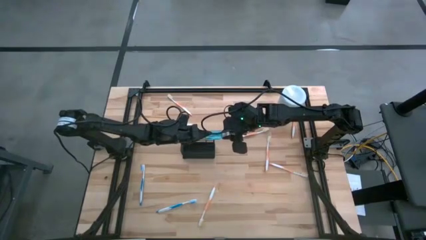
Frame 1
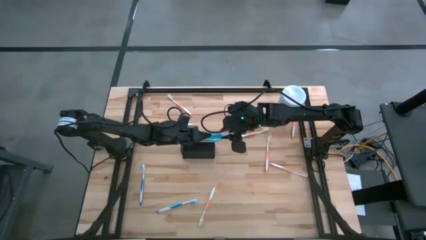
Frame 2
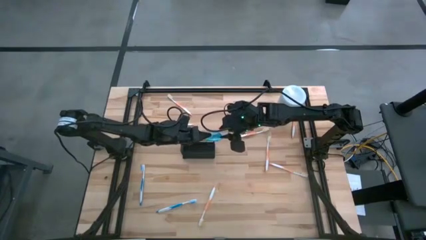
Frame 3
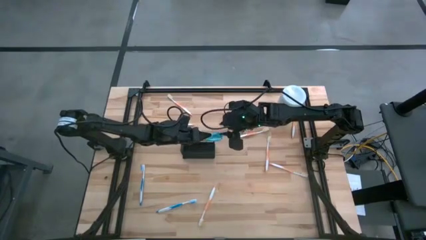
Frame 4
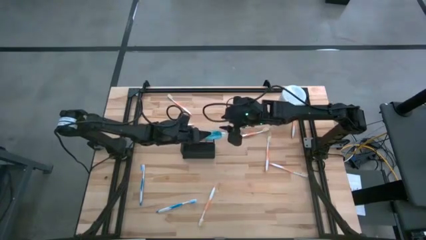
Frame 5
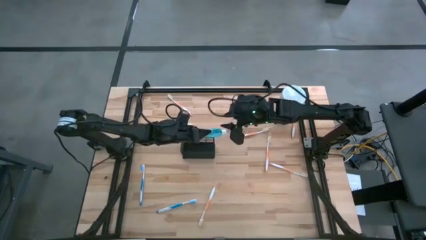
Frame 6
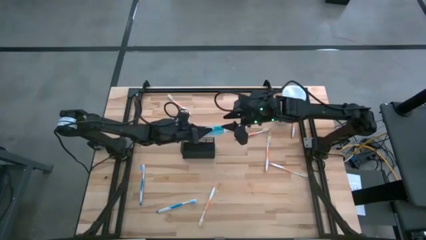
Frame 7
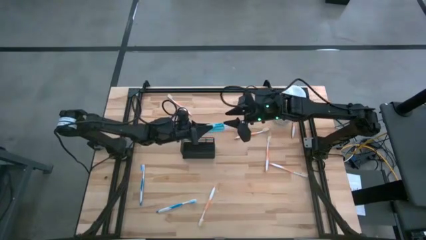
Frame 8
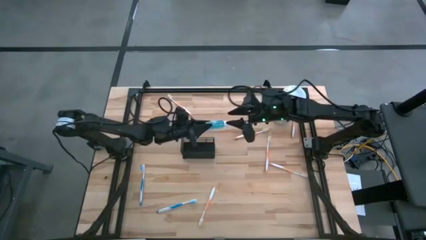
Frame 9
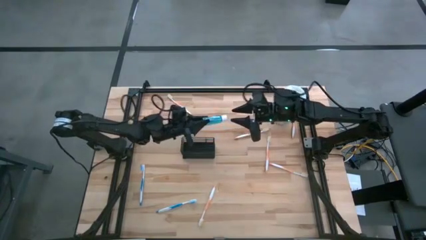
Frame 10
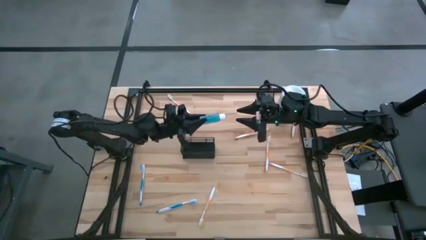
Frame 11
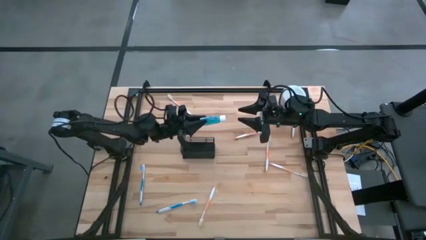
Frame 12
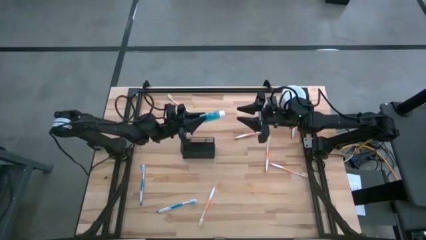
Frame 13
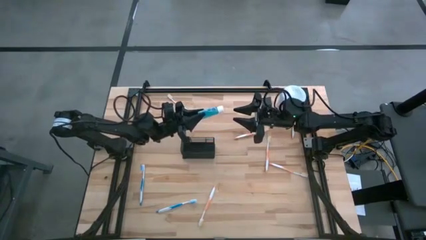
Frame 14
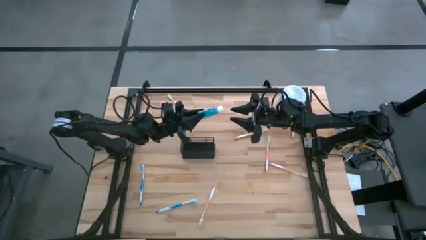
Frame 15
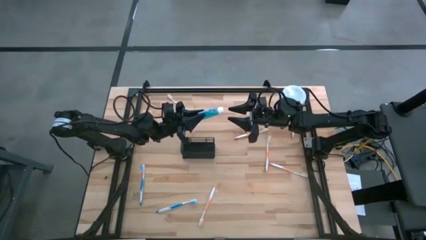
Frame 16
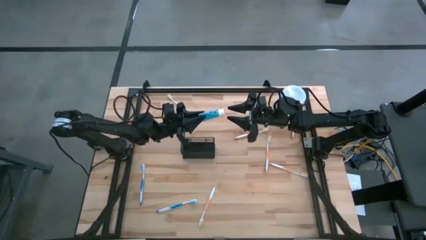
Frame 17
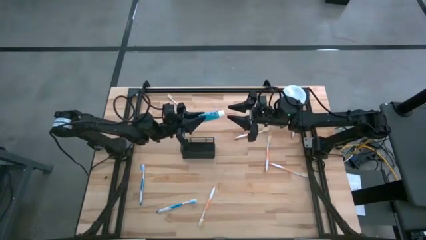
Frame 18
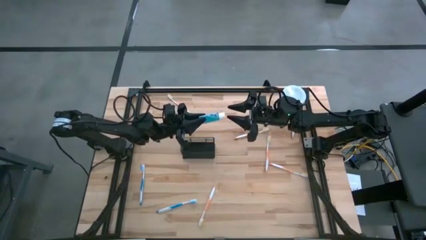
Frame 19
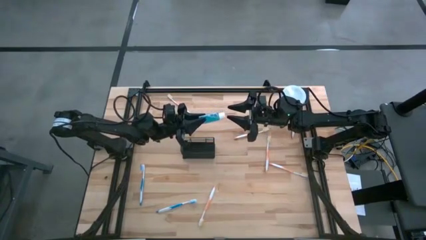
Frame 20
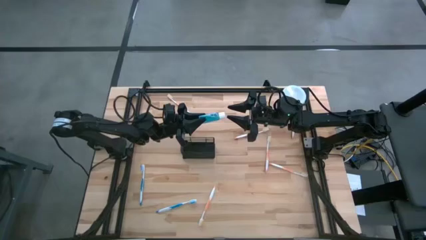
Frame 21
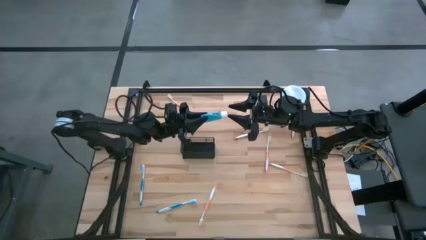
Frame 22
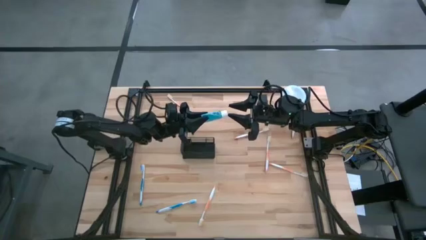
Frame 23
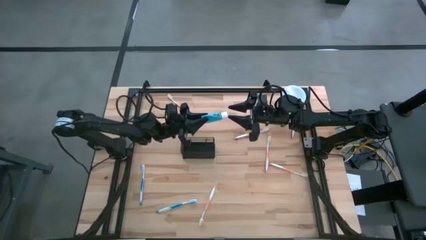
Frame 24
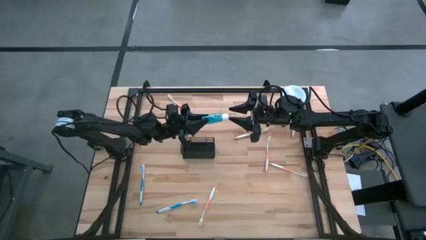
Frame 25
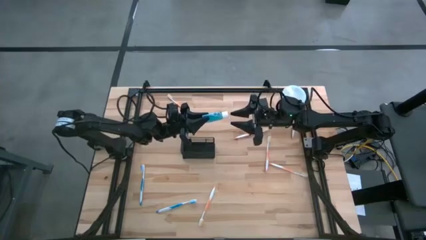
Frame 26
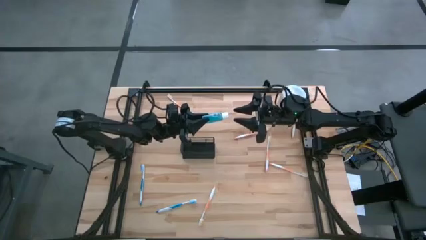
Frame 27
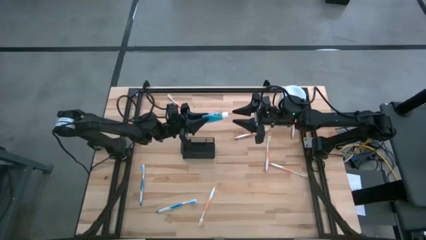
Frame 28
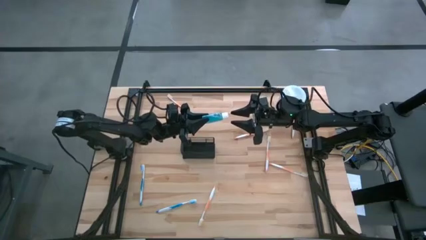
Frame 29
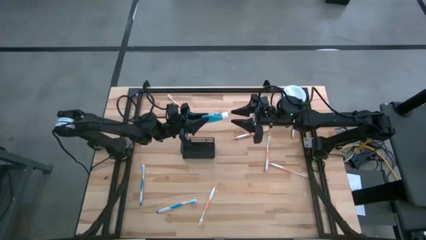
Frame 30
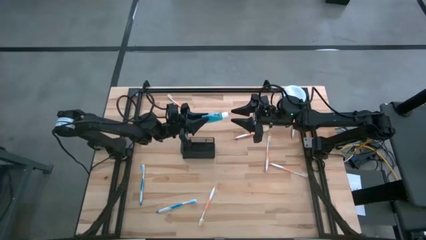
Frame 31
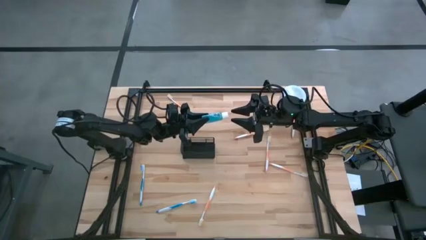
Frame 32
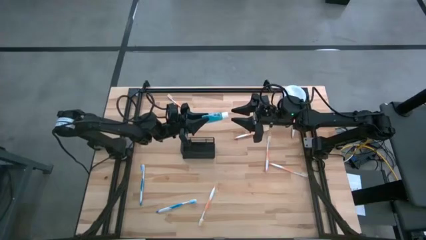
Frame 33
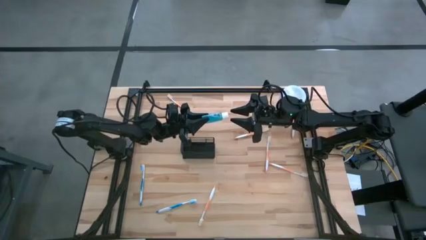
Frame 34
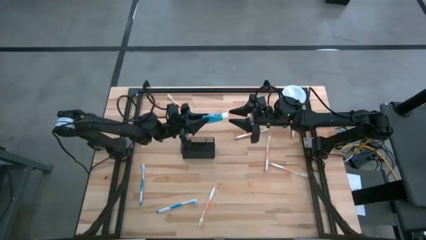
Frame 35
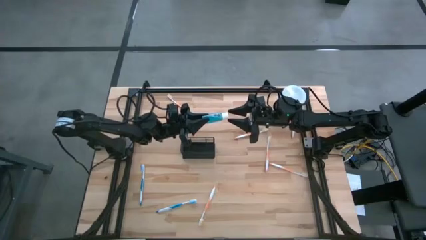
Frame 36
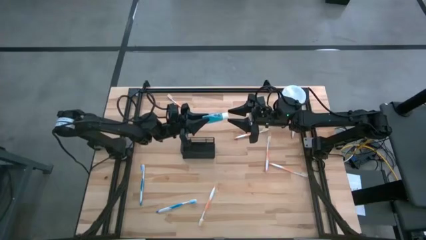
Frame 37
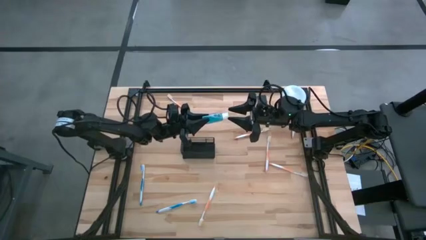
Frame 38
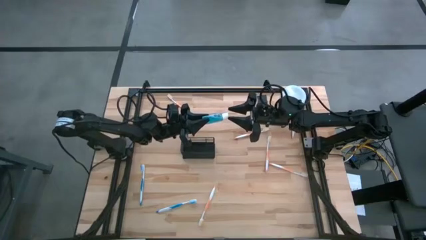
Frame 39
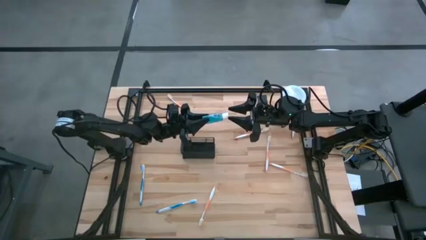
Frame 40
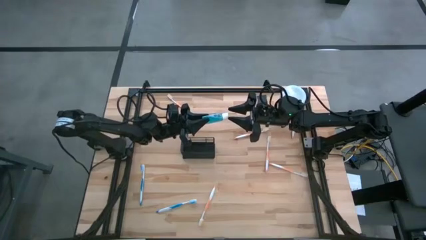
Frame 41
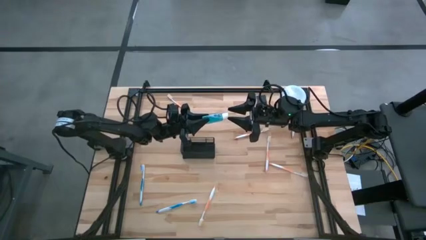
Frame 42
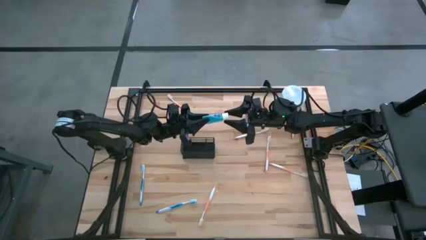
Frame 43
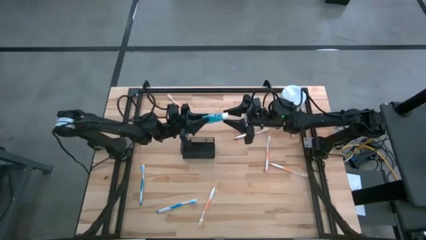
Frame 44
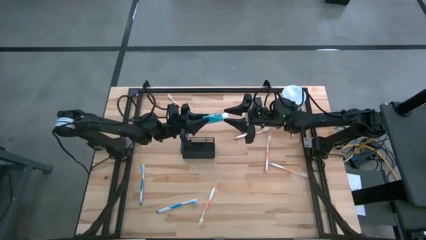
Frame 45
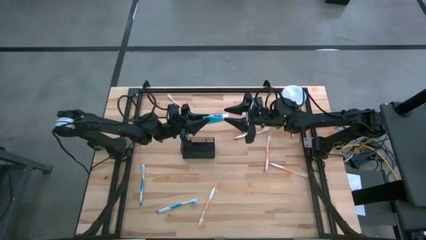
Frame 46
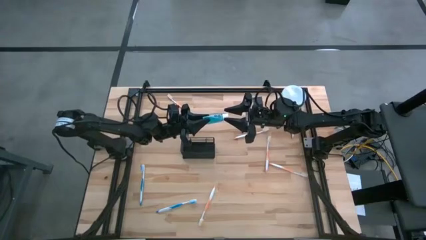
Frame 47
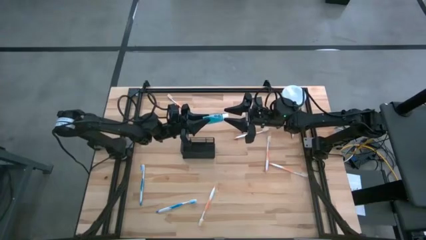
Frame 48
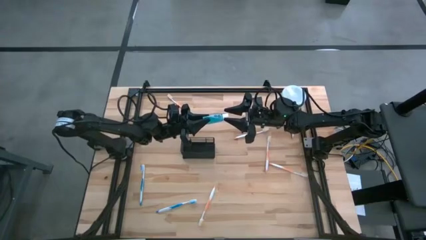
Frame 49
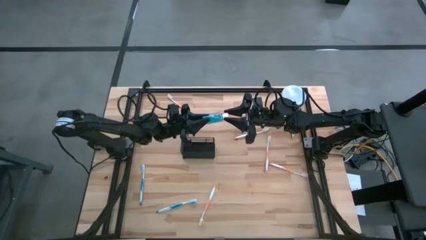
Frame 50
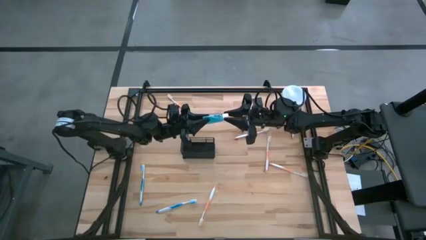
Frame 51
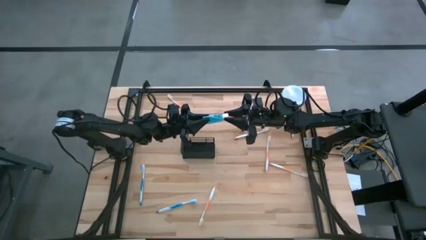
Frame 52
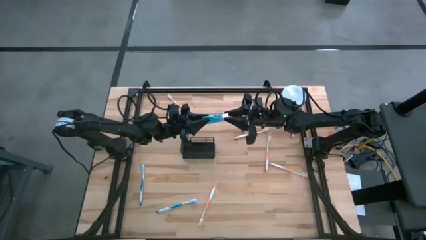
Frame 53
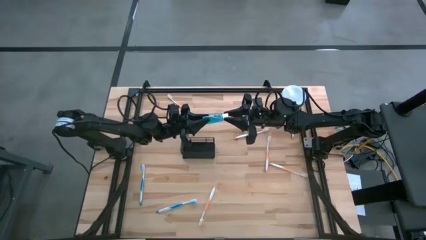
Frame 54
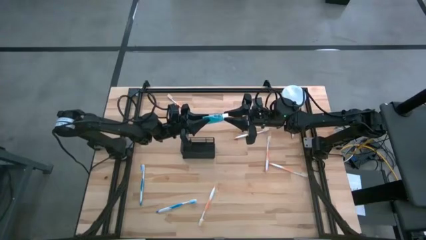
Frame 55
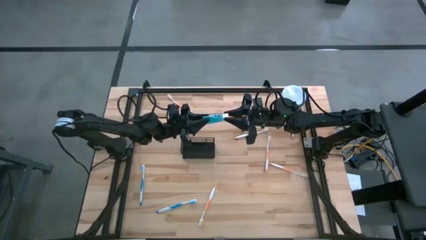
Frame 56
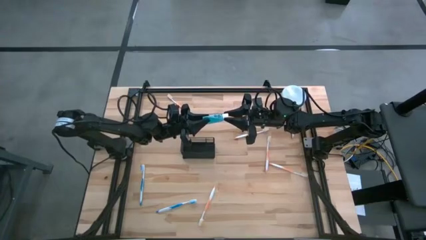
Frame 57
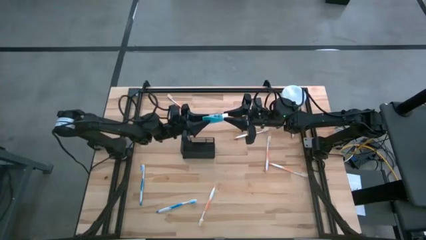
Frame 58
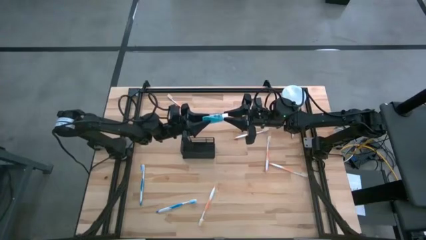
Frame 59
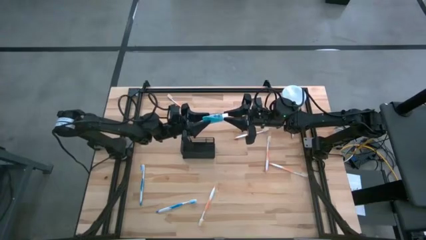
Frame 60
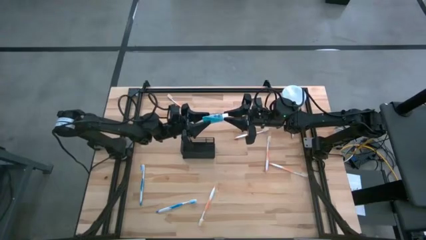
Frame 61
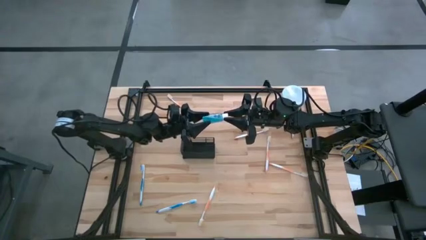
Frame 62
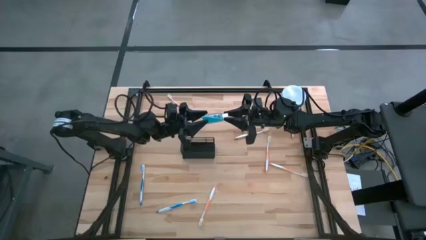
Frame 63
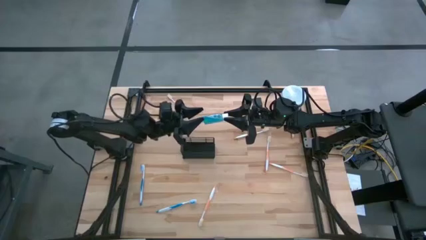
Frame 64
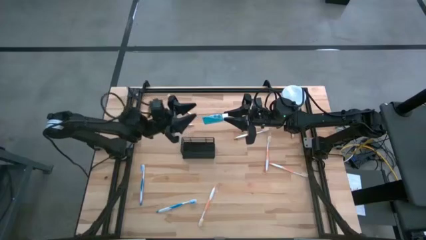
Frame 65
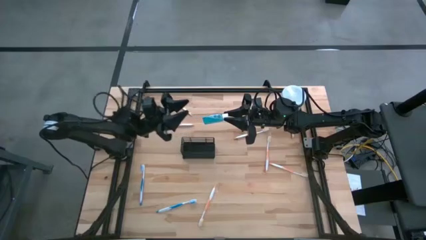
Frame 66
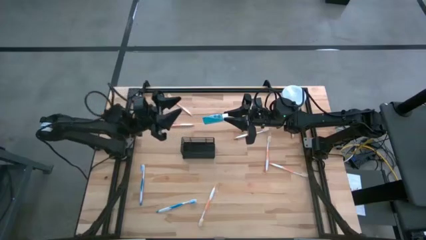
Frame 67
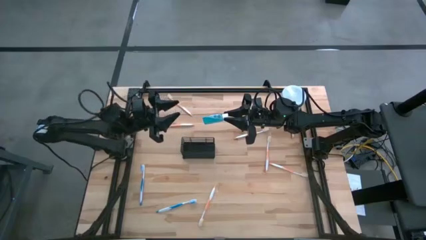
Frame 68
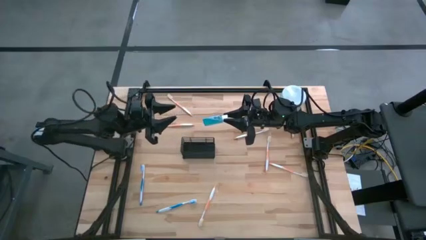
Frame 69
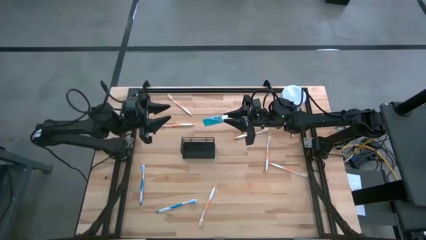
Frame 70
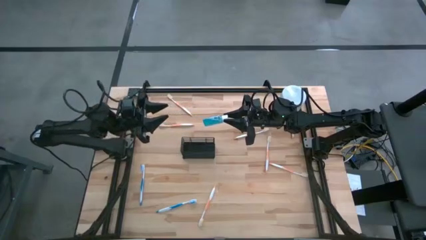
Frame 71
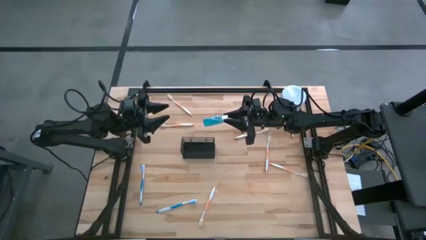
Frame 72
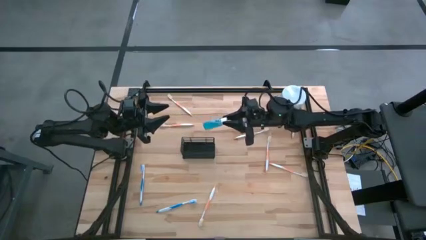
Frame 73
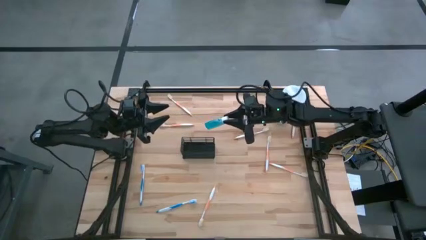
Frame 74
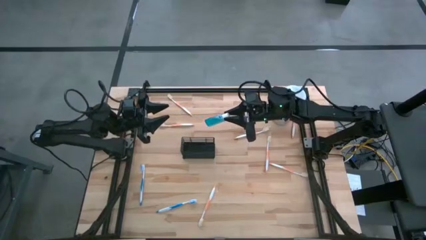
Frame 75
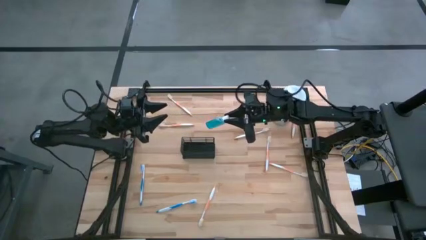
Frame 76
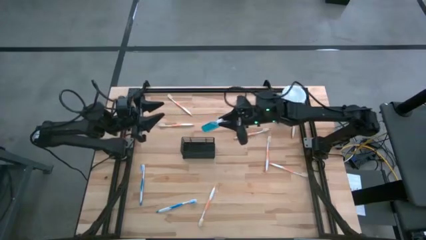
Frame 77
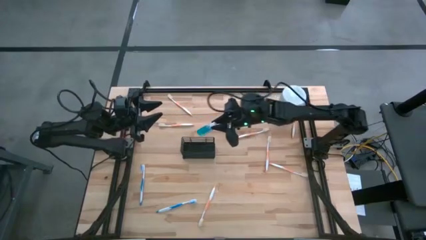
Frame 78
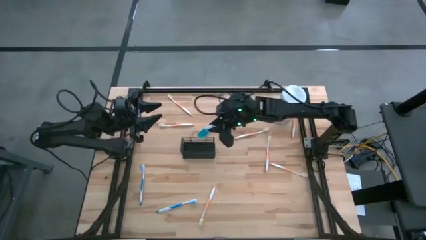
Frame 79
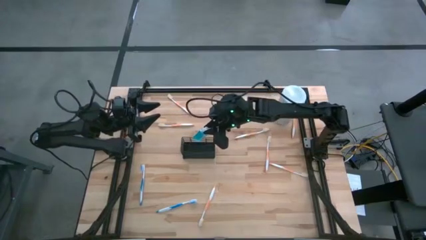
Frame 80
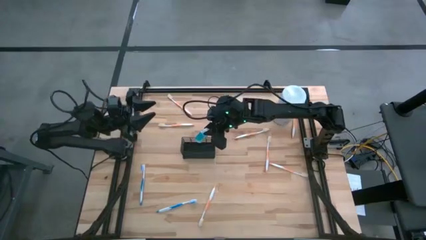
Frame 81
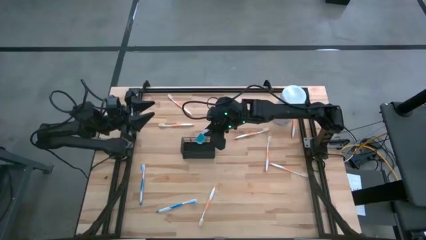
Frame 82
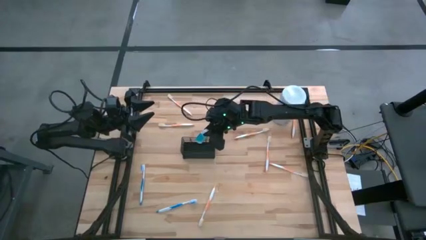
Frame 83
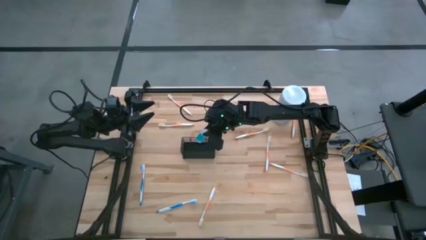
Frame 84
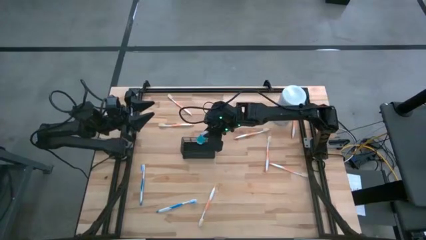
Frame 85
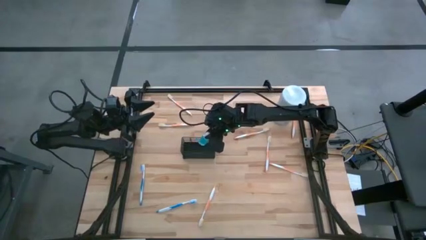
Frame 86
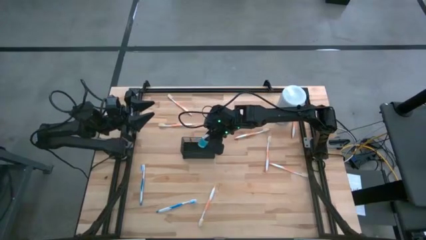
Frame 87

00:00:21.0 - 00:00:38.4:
Task: Pick & Place toothbrushing station
Put the blue mouthwash into the middle section of the wire organizer
